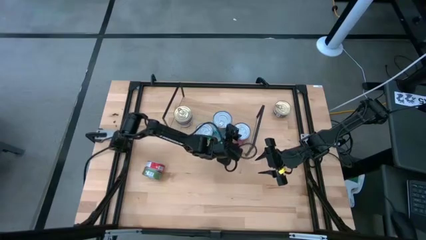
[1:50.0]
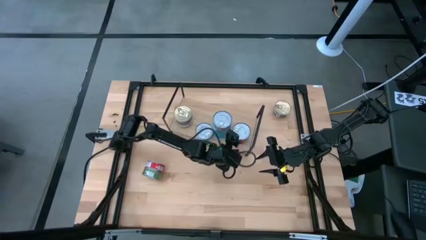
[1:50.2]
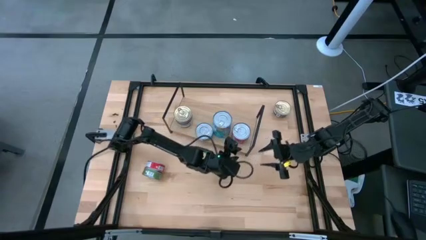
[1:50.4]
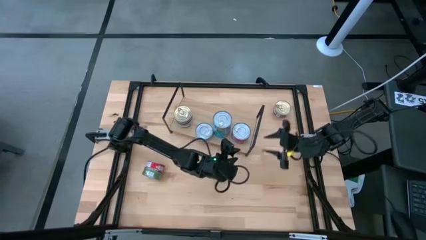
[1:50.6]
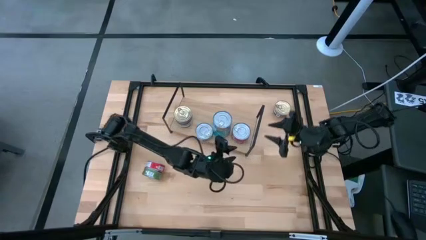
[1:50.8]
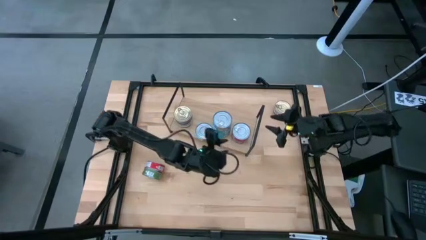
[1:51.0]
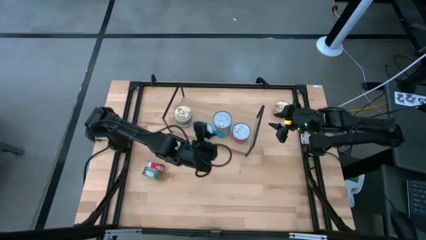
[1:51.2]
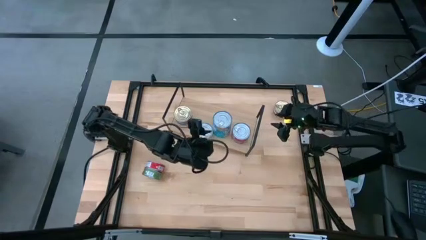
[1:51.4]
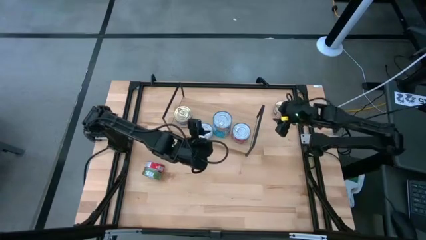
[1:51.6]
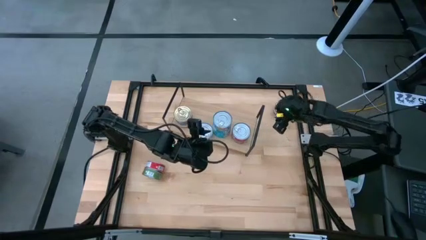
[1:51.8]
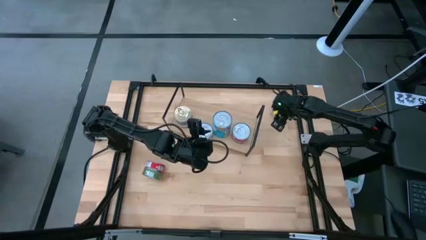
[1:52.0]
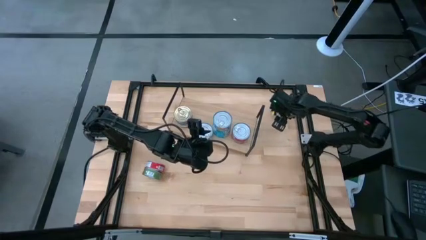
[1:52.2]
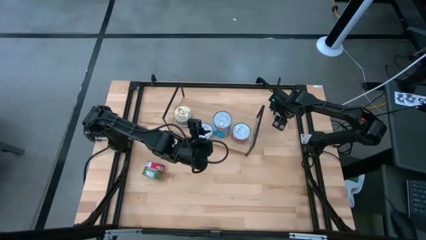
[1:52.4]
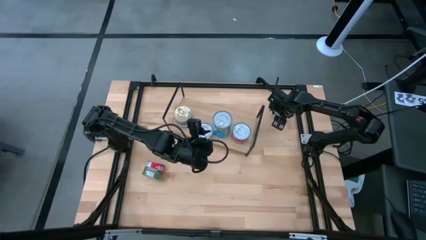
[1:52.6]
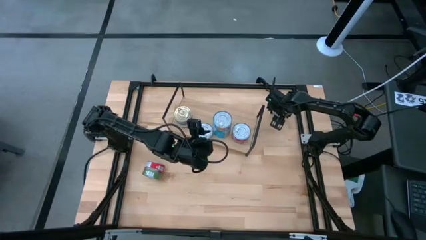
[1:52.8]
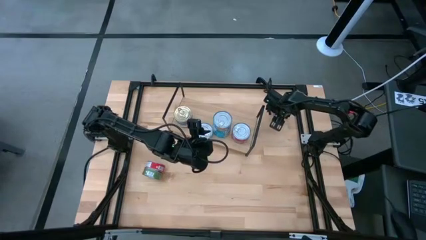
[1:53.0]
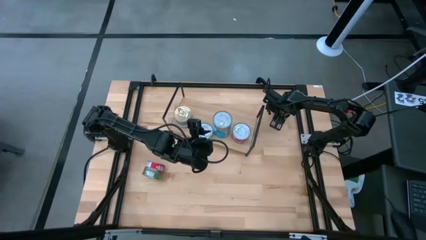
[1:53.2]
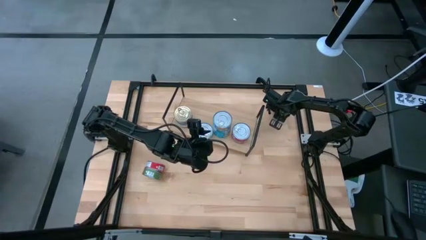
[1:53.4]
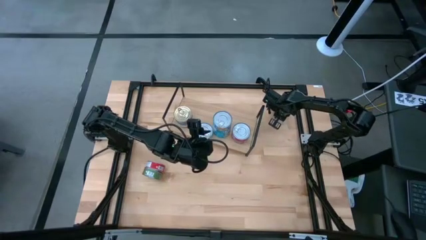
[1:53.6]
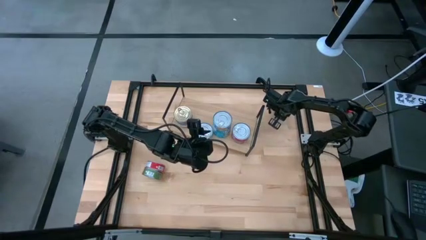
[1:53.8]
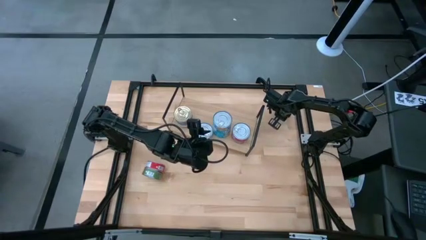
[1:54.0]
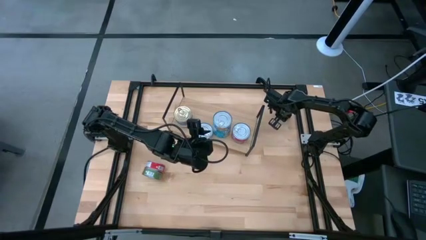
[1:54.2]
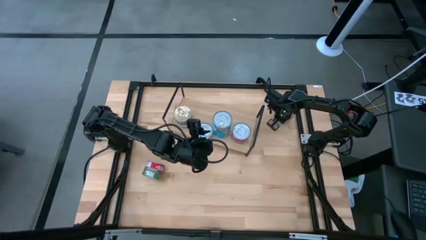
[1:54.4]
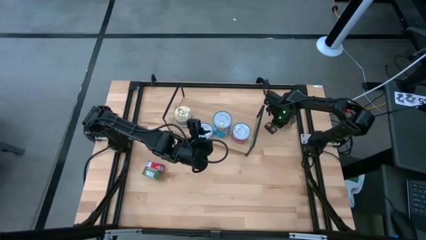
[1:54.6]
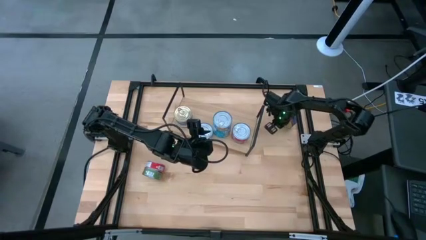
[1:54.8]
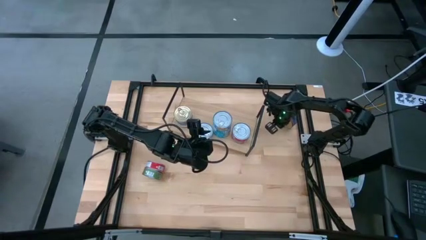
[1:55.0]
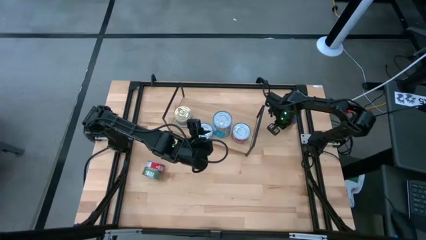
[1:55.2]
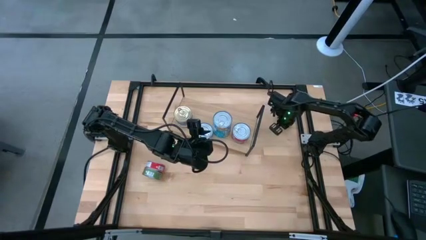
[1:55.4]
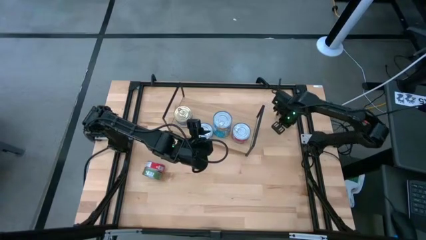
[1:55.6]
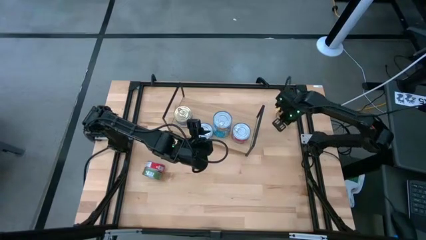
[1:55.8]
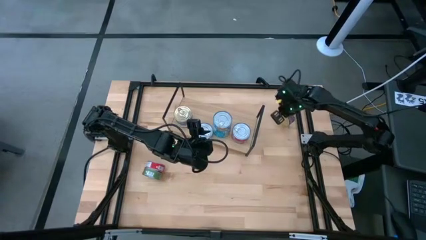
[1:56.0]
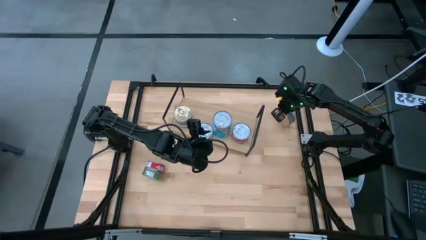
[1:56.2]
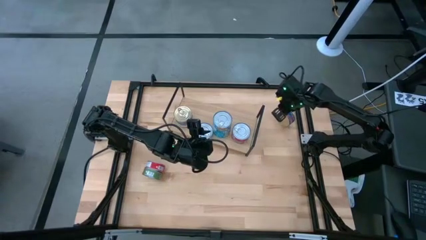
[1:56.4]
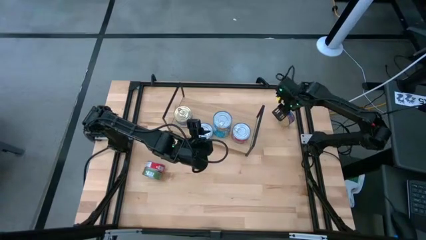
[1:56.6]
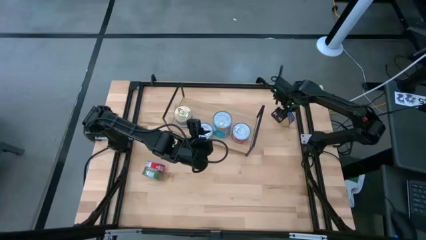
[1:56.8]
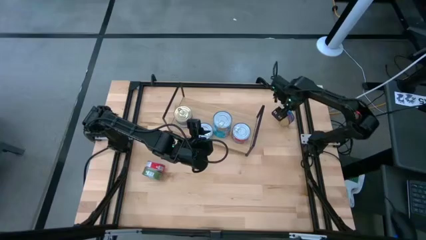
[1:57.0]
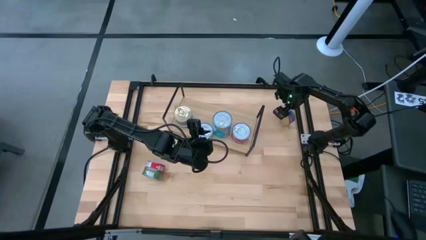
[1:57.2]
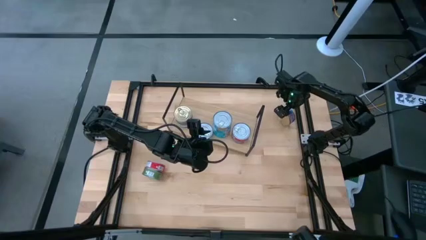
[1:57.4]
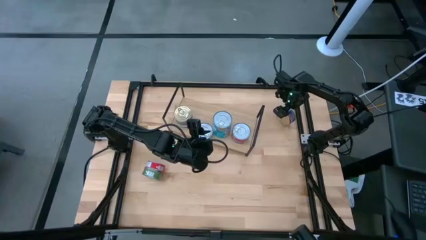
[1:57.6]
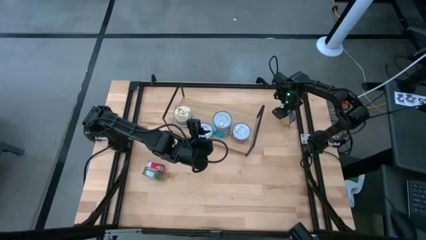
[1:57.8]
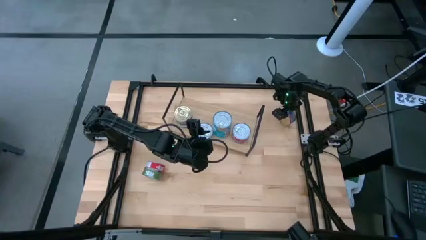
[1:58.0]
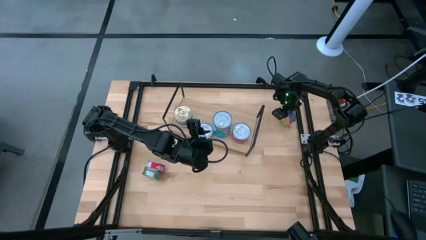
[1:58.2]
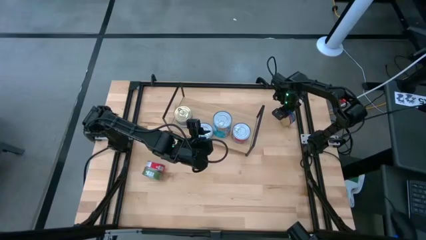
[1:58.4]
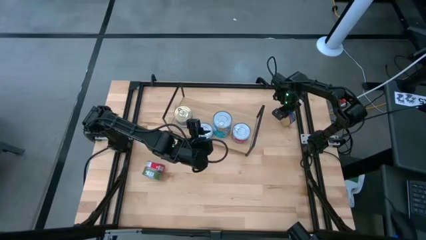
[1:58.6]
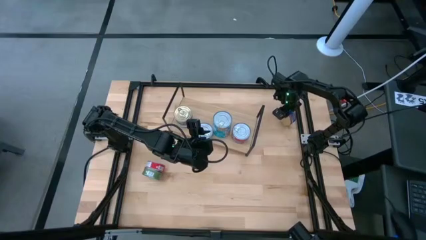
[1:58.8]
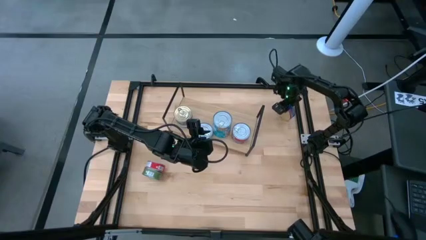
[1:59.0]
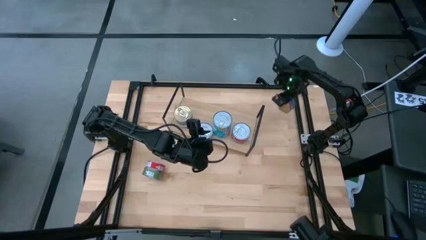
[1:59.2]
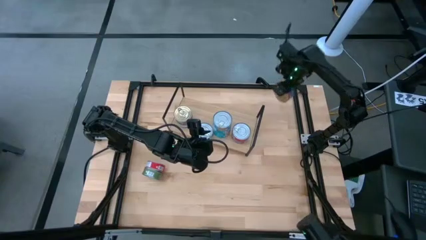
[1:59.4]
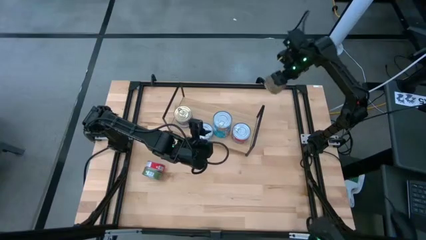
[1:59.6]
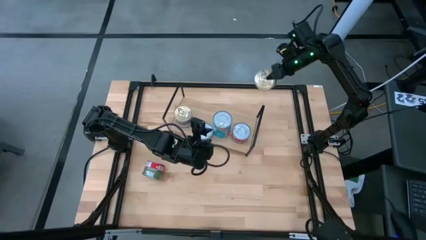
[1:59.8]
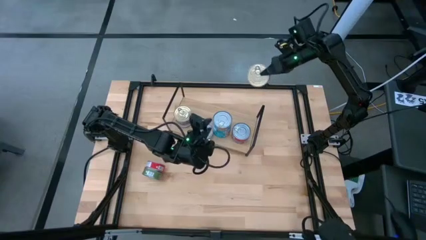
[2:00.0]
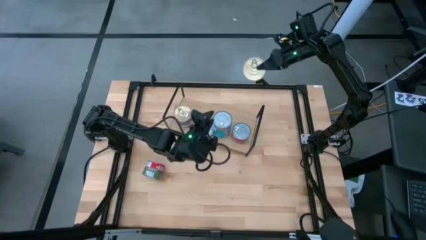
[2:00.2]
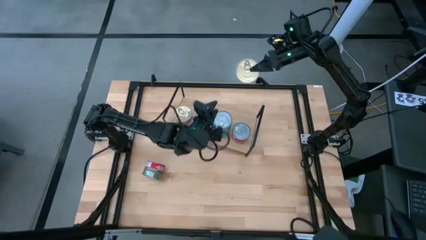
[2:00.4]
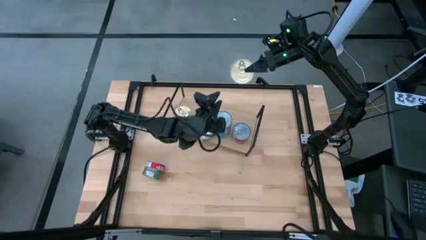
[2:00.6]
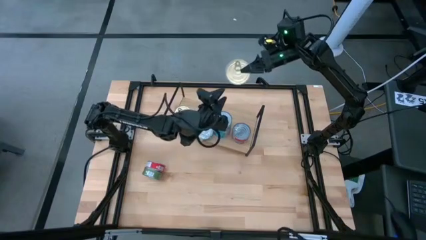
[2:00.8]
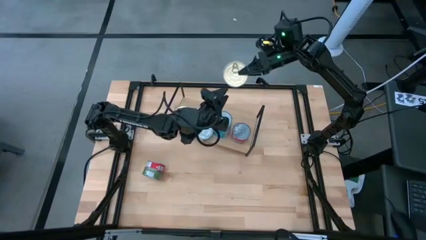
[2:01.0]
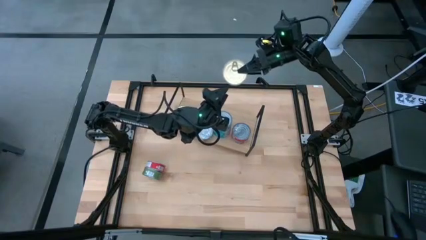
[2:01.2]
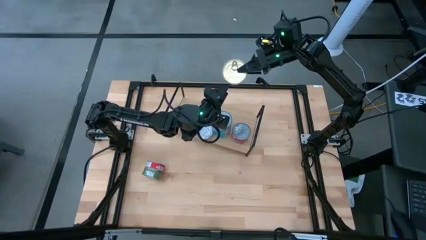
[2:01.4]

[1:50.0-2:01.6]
Task: Stack canned seafood by type on shelf
Stack the blue-pink tuna can on top of the blue-pink tuna can on the shelf

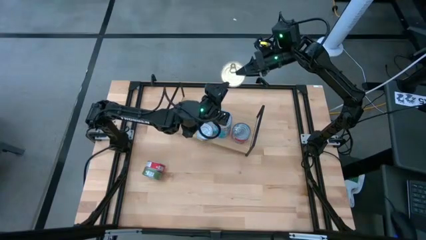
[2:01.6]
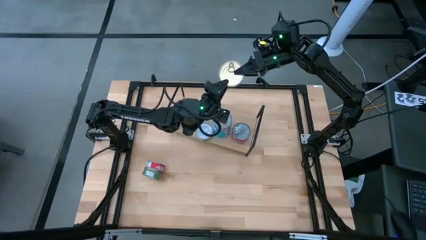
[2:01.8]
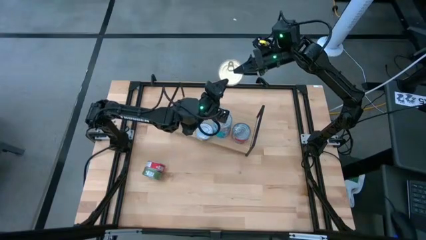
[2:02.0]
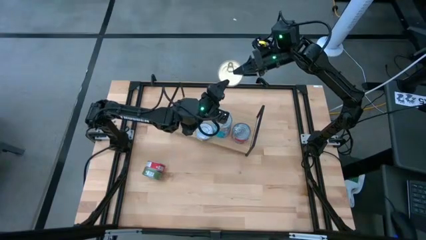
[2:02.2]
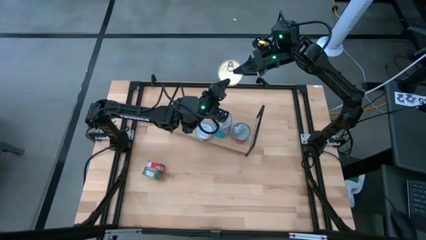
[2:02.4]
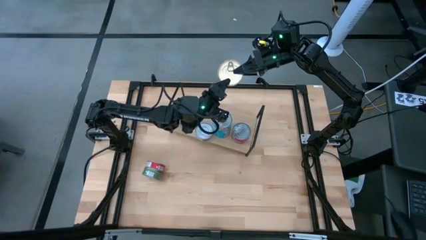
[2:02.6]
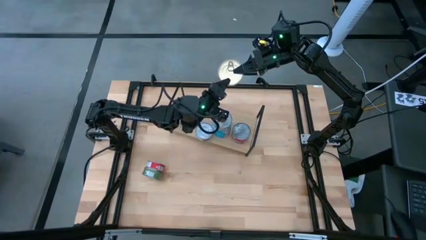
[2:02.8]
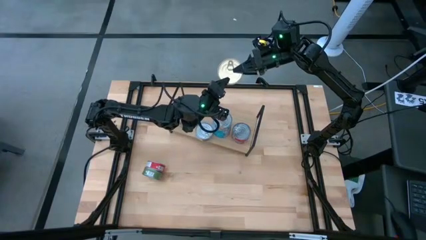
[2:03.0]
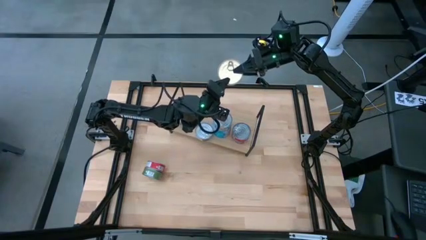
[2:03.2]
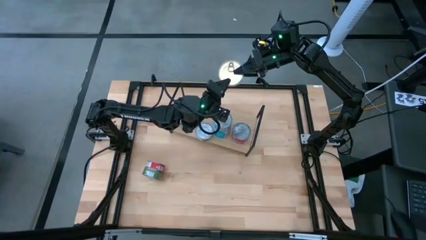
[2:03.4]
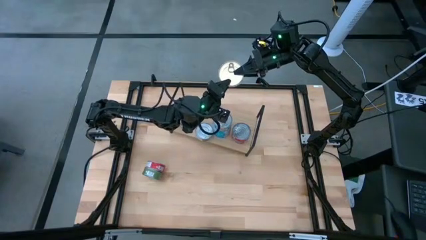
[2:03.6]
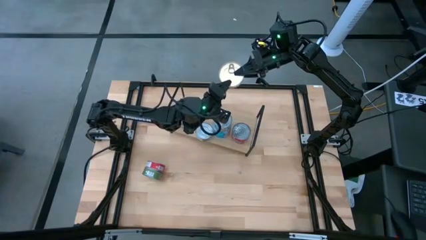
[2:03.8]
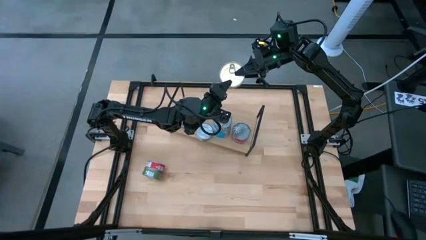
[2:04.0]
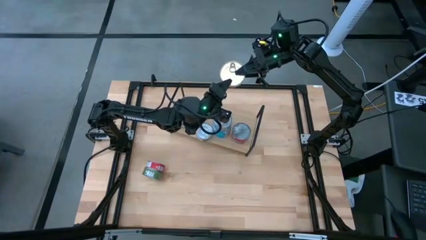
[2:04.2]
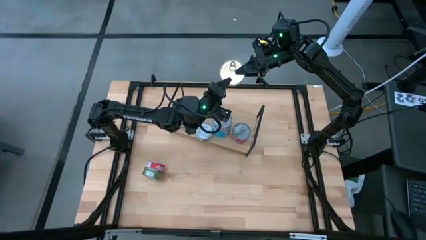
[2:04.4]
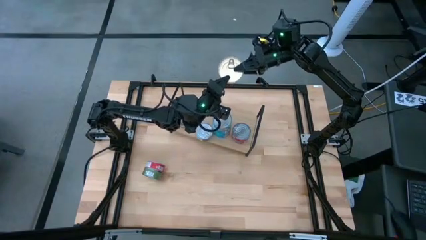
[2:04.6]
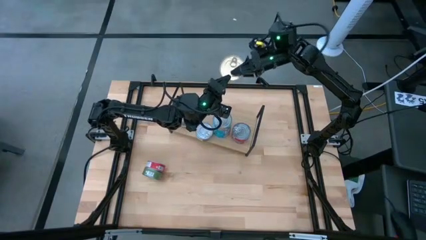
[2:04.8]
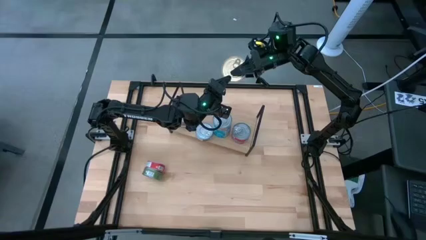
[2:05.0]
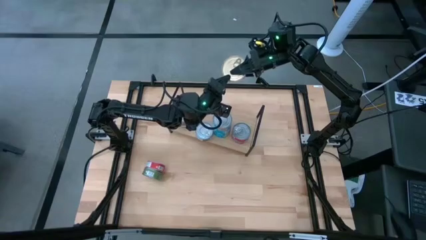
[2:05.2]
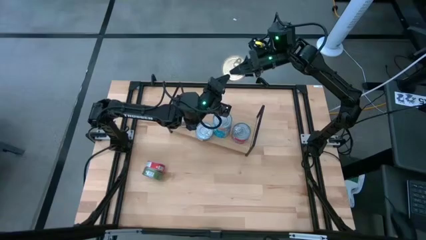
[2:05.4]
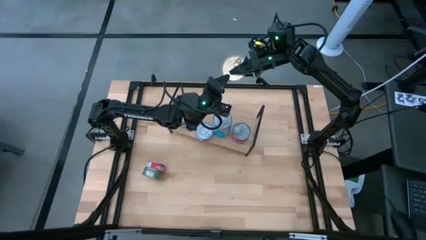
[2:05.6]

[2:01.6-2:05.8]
Stack the blue-pink tuna can on top of the blue-pink tuna can on the shelf
